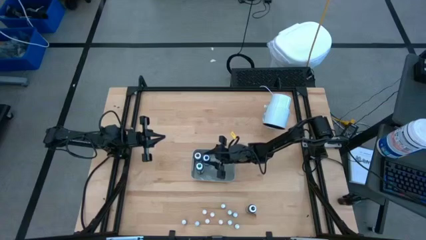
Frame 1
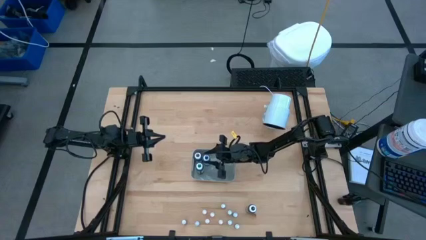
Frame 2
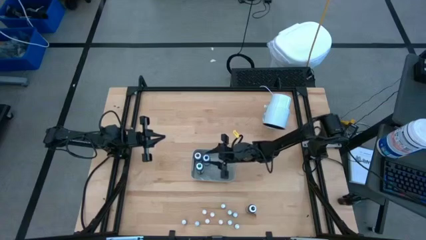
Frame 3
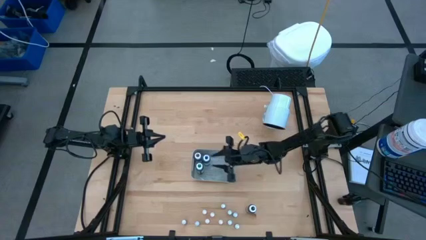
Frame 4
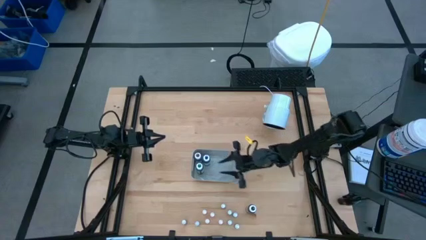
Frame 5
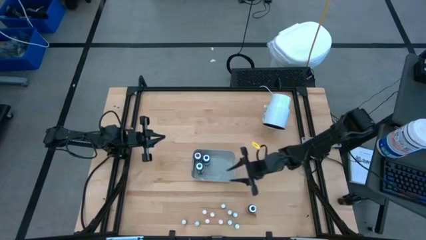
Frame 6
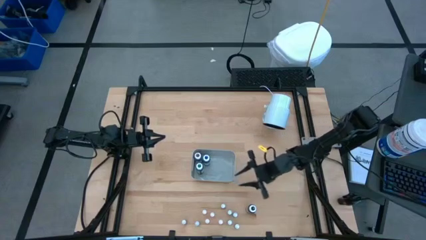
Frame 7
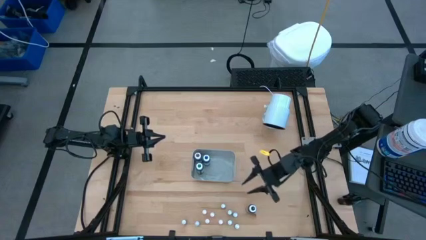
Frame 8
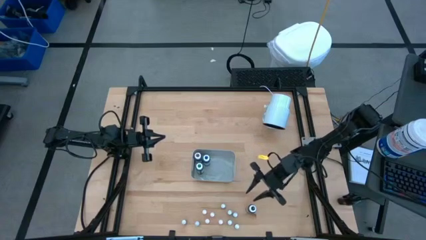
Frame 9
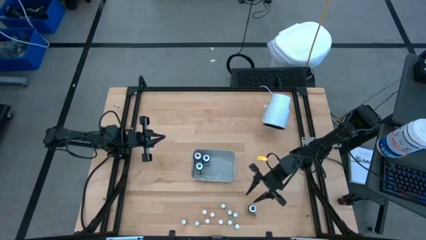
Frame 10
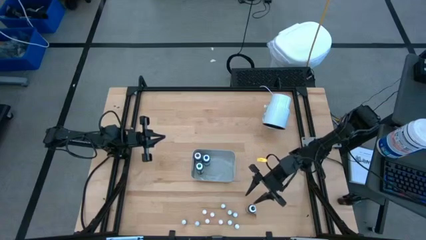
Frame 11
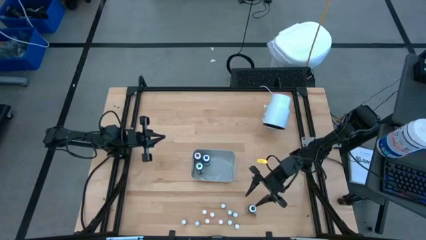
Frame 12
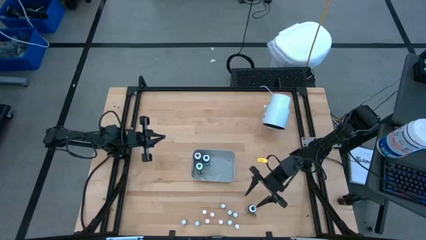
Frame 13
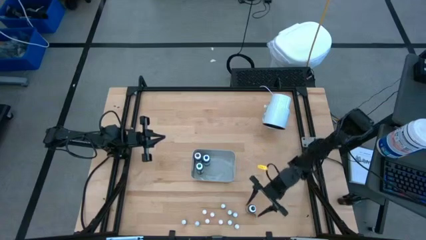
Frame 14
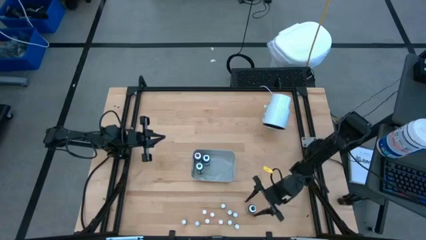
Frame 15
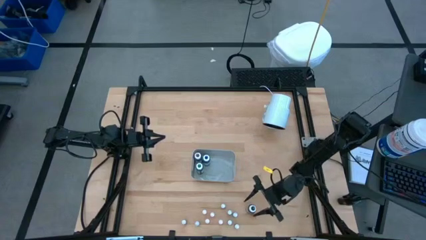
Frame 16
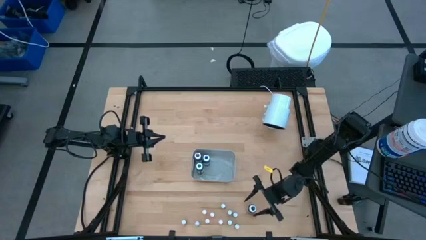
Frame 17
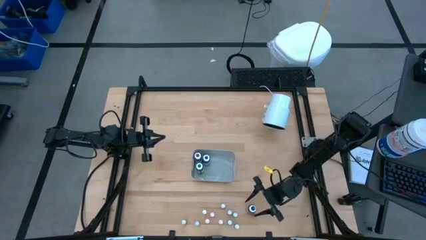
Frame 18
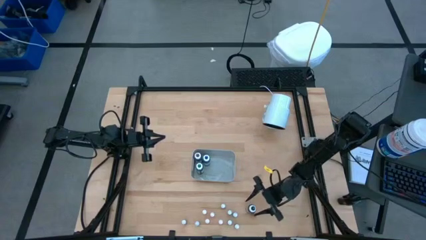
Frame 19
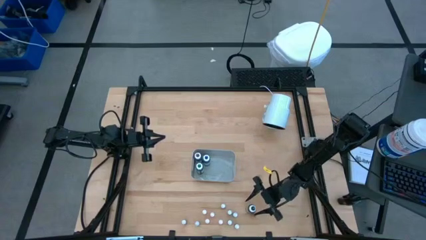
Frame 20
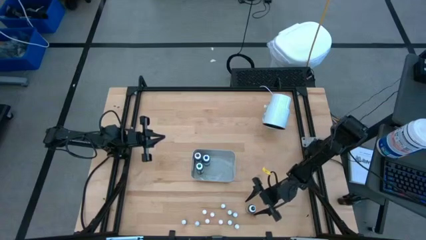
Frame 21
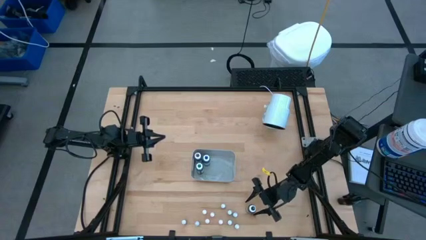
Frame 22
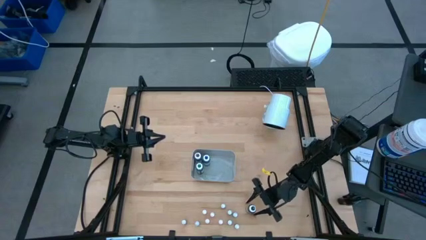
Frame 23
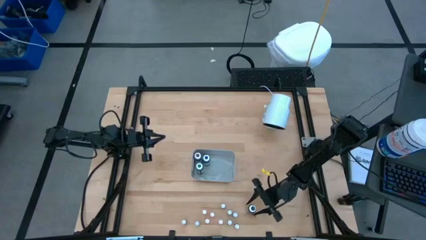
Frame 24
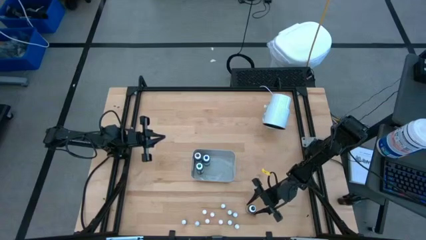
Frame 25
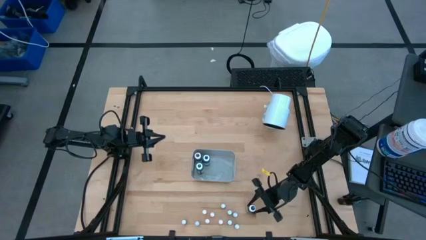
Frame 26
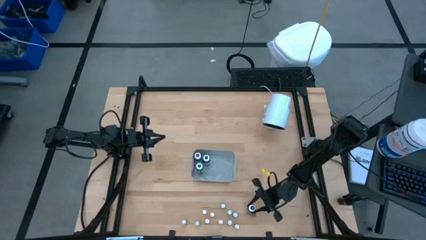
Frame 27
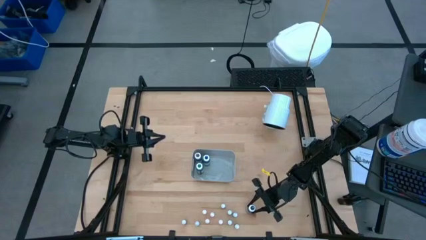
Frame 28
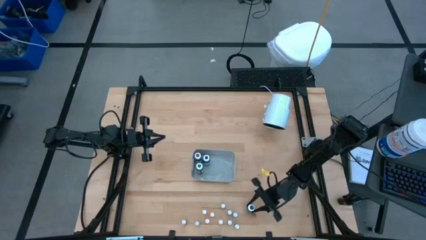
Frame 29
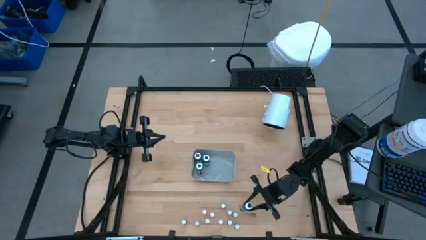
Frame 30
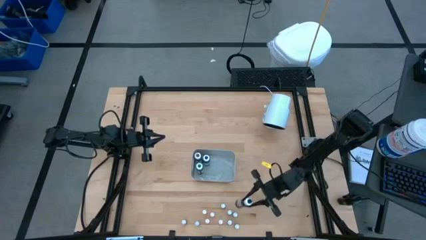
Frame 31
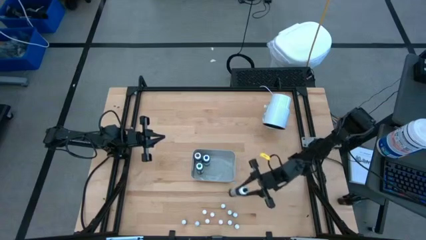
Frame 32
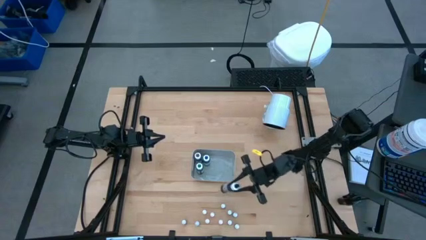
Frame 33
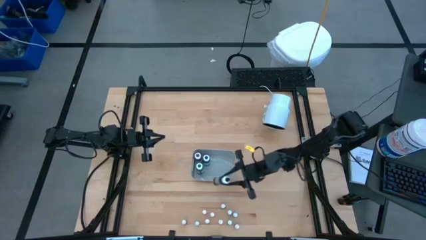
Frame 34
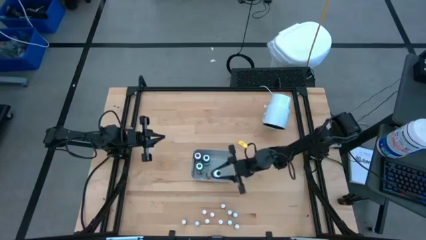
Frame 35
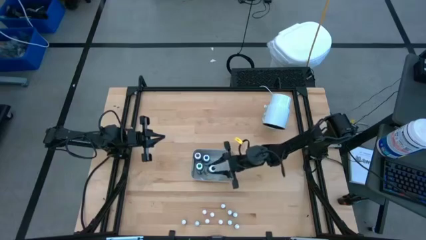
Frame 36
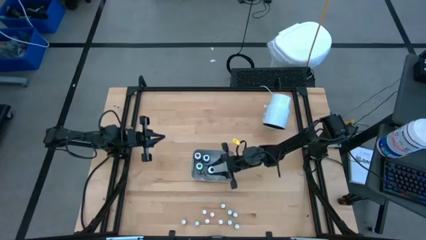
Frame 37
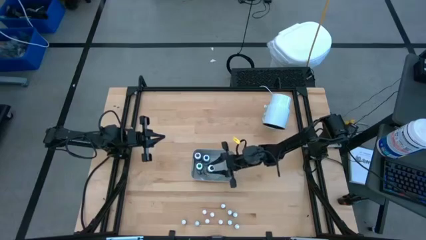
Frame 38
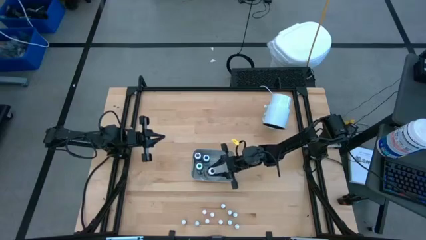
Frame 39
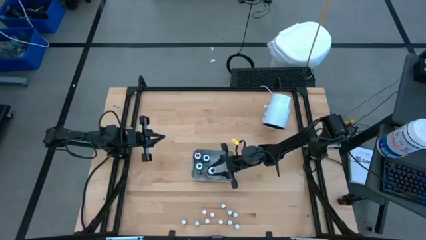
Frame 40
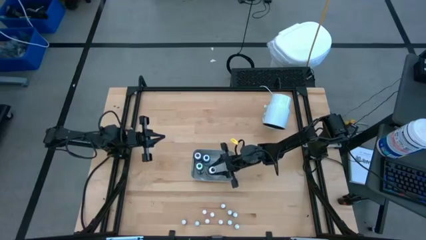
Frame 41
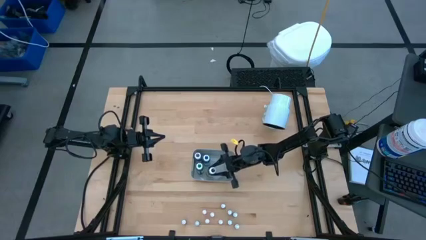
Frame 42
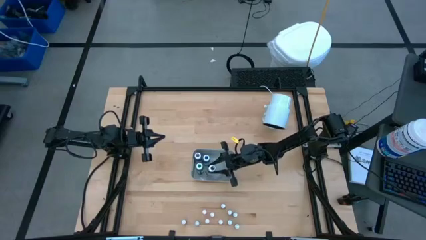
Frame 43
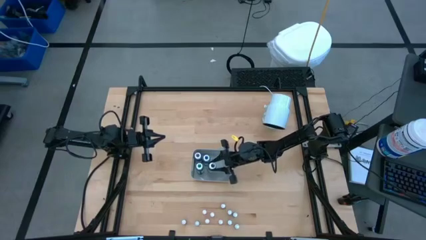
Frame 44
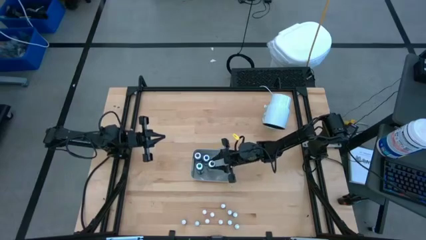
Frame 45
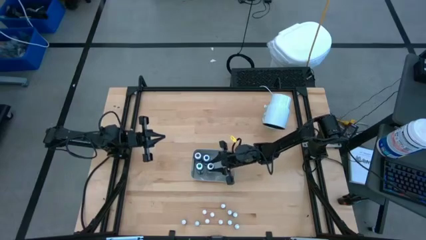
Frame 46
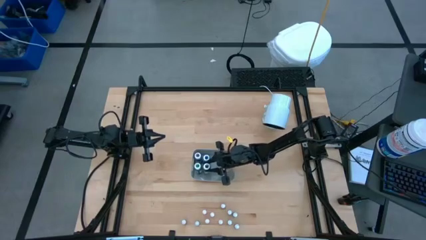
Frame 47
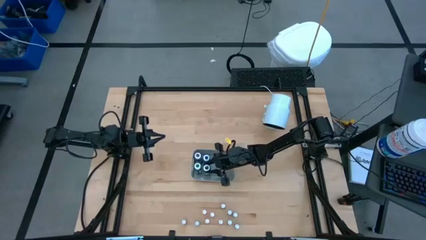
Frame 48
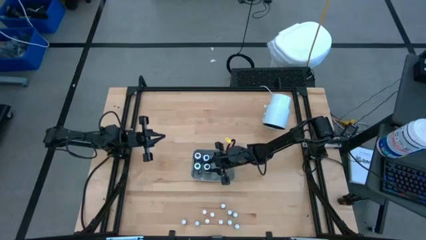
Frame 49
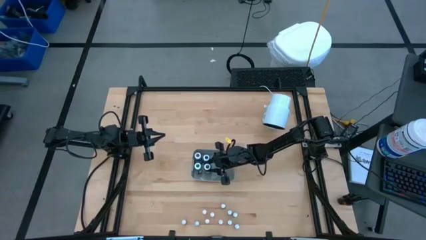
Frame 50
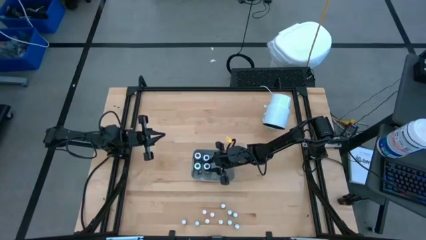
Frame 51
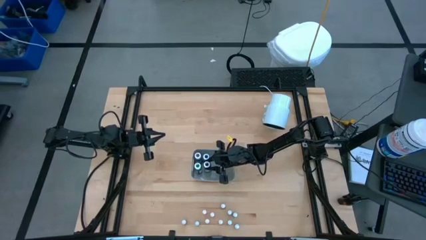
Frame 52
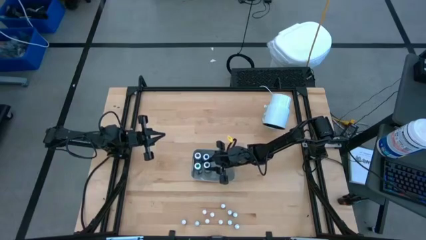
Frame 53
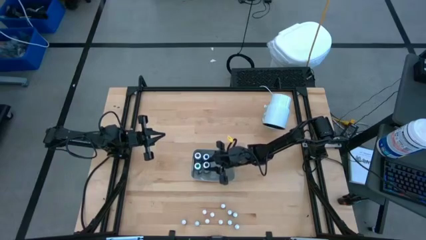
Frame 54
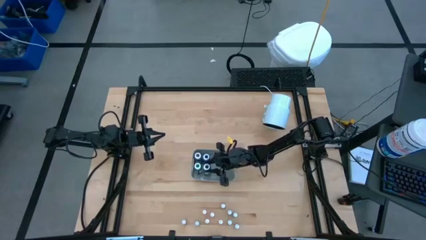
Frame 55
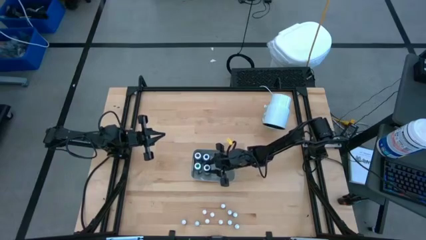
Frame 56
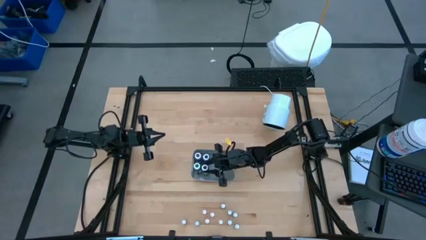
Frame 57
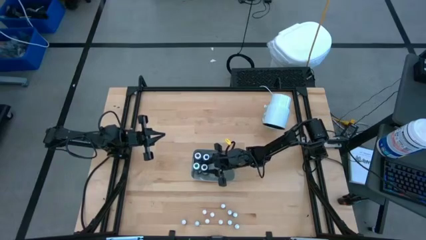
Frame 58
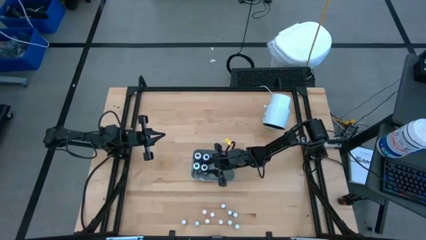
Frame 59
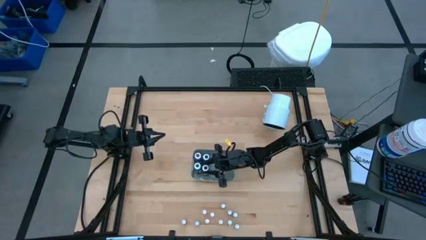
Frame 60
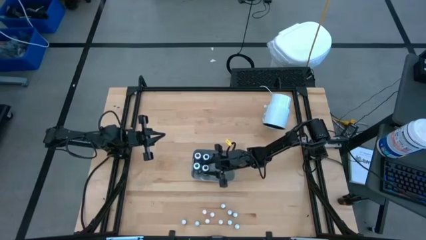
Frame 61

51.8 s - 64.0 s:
Task: Pick & Place food coloring
Put the big black food coloring bottle into the gray bin

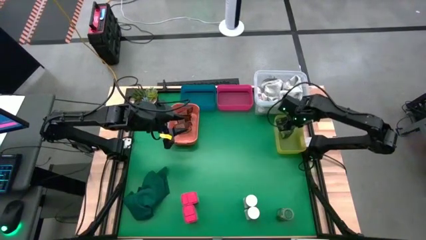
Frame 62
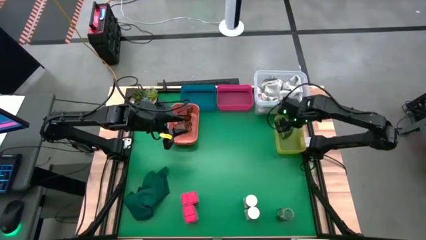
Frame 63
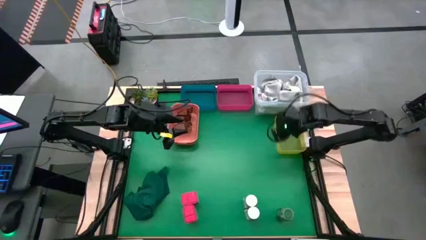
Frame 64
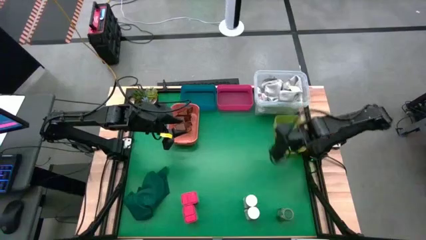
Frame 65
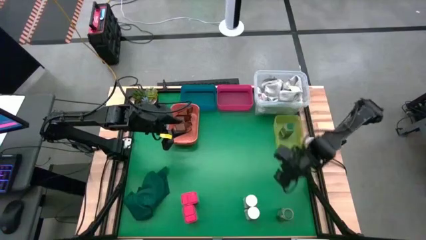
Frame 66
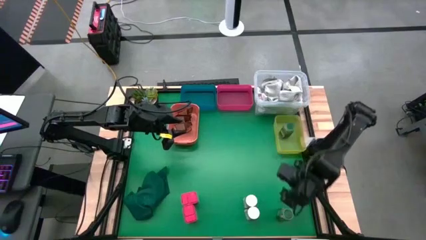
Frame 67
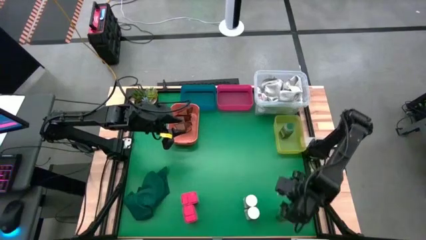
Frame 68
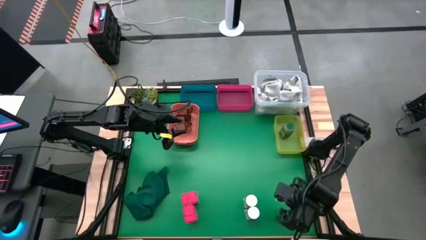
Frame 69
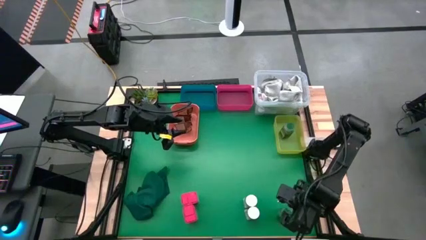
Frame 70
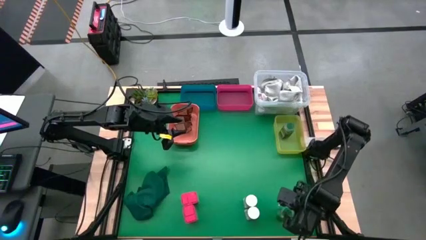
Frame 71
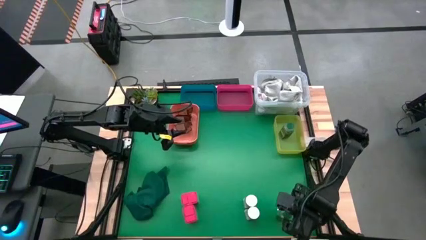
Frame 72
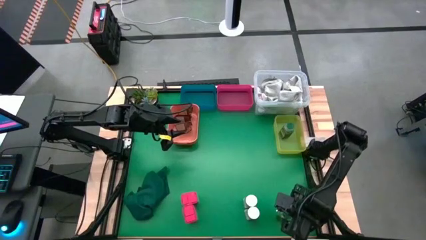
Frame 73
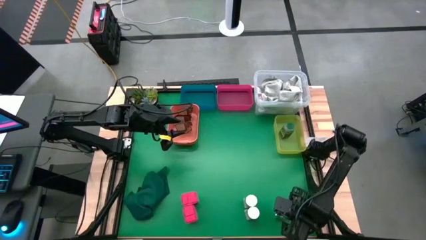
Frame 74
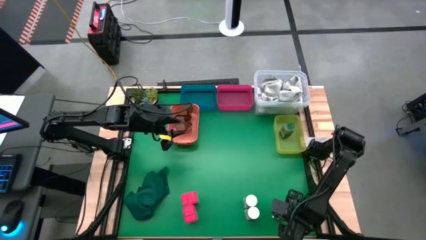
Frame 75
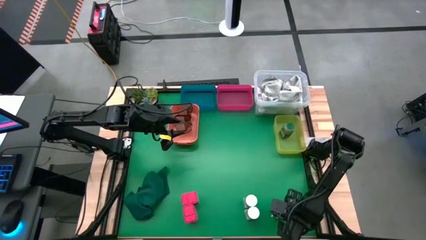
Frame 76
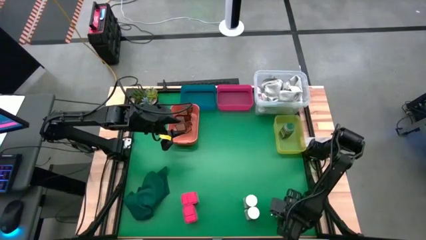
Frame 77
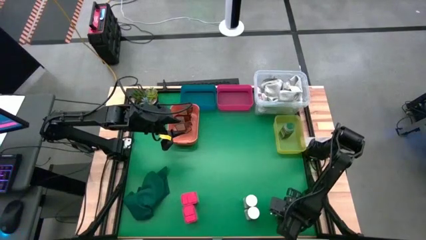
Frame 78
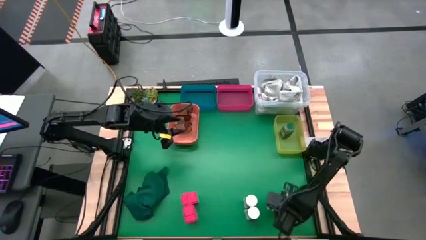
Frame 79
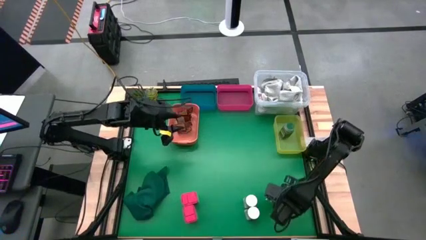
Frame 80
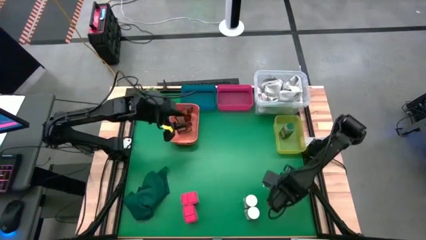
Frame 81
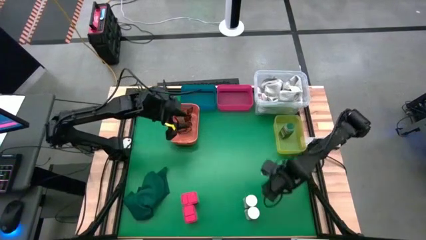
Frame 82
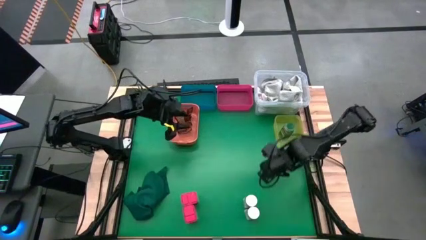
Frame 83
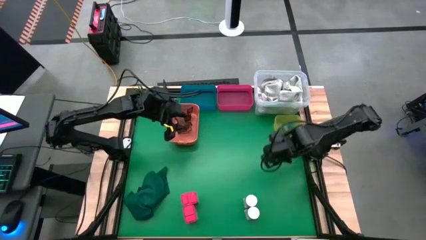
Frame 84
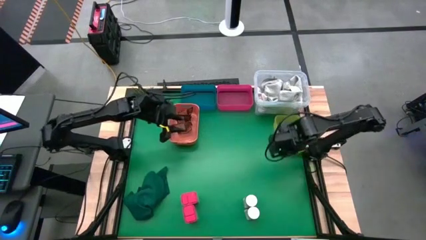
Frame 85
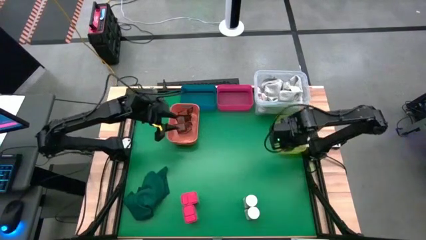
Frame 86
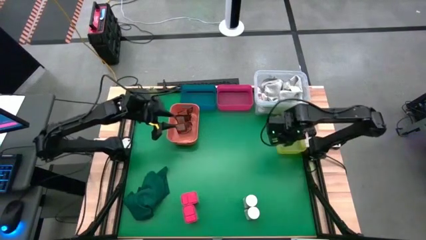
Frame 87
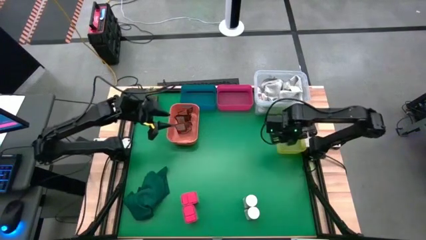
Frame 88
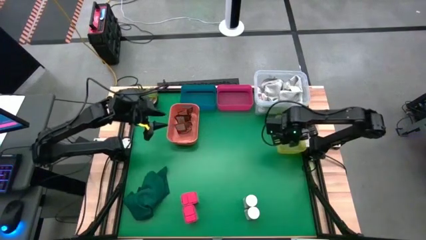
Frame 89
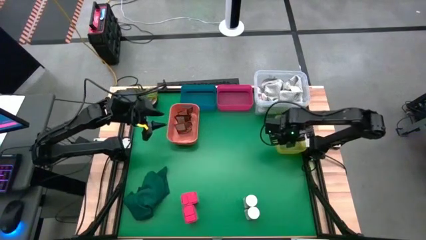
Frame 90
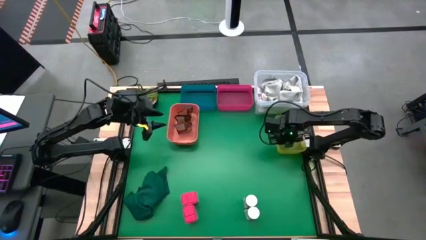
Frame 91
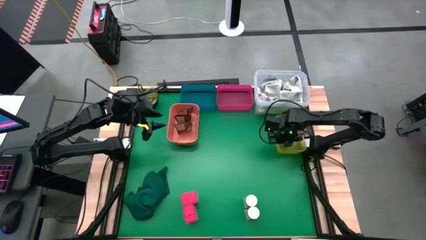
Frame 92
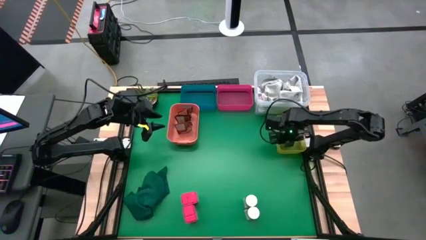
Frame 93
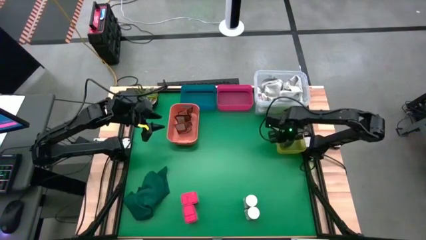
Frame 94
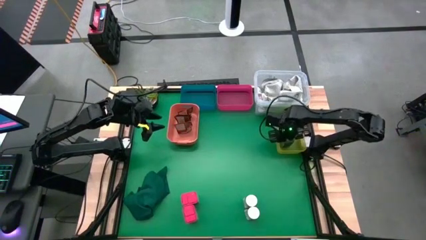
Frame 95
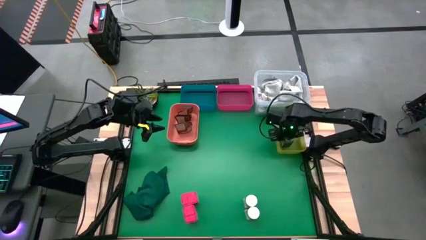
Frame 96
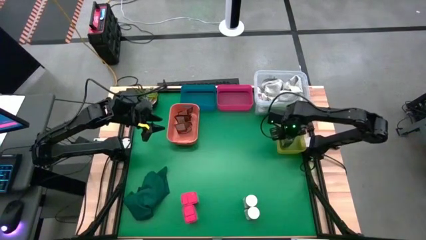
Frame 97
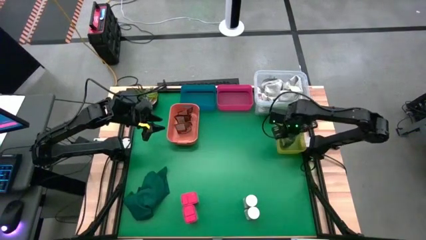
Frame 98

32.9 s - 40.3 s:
Task: Sort spices by type
Put the green spice bottle into the yellow bin
